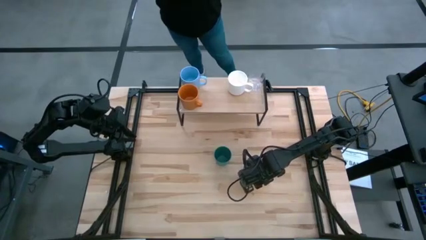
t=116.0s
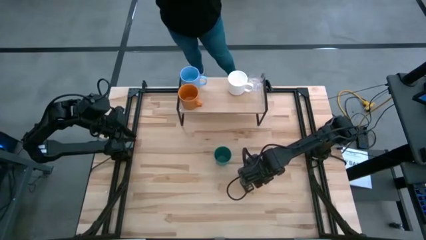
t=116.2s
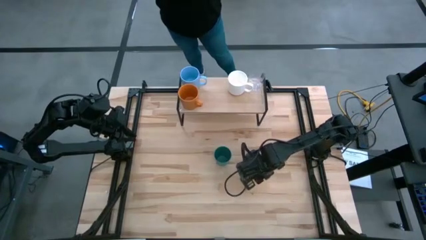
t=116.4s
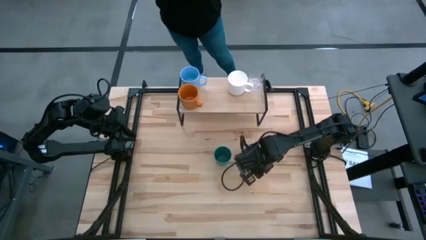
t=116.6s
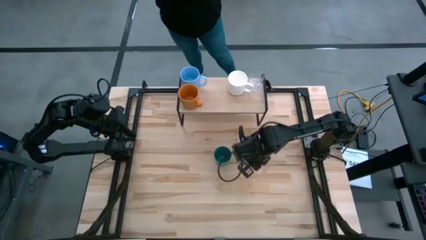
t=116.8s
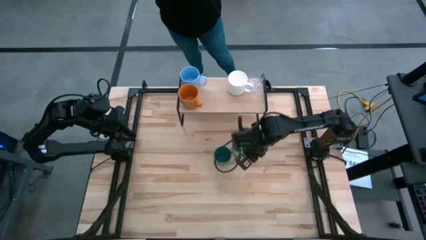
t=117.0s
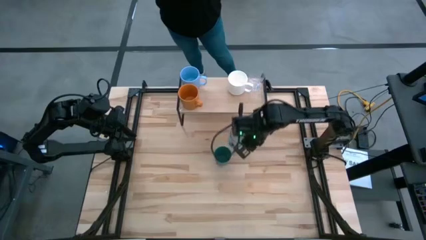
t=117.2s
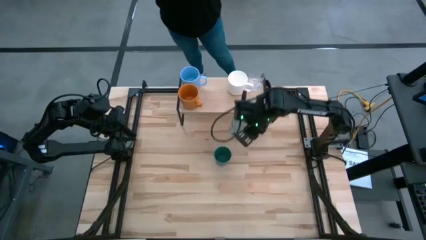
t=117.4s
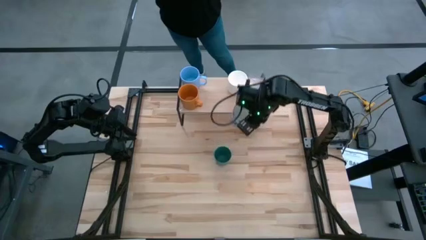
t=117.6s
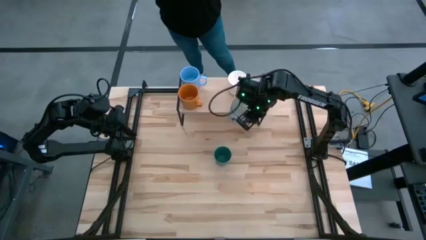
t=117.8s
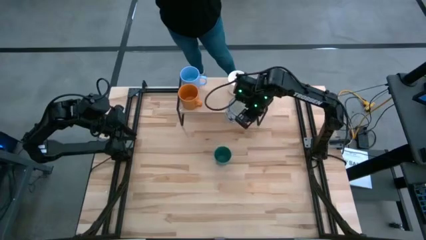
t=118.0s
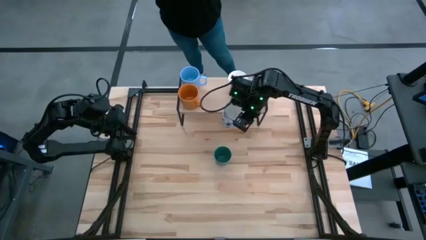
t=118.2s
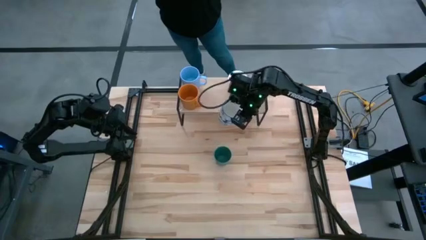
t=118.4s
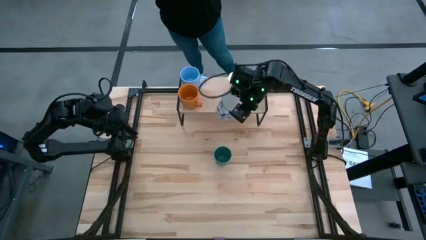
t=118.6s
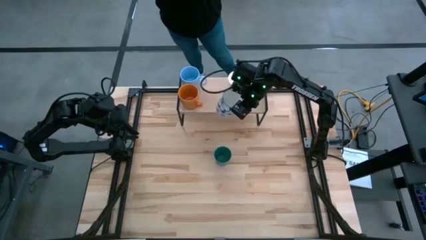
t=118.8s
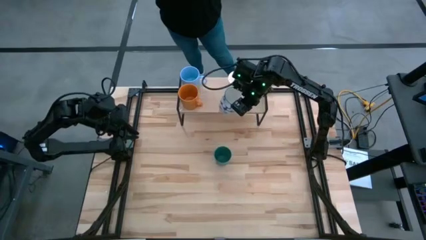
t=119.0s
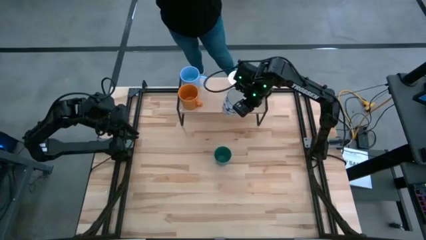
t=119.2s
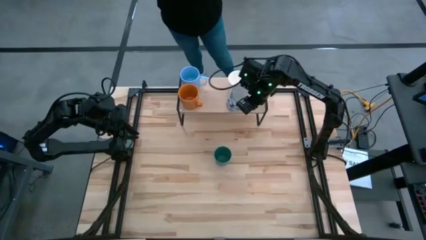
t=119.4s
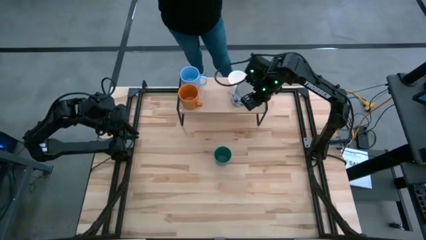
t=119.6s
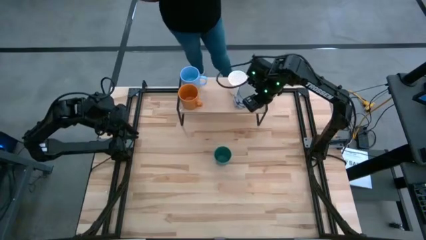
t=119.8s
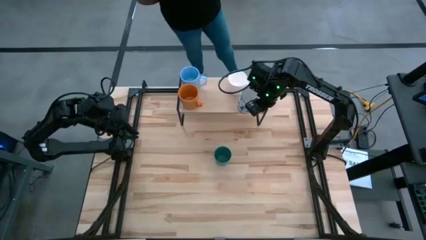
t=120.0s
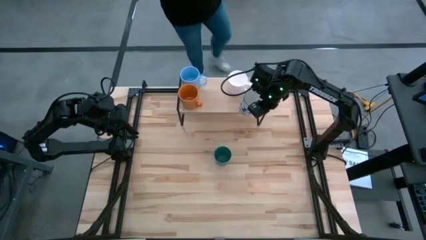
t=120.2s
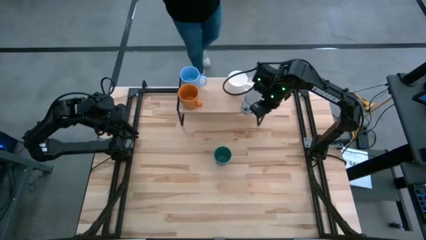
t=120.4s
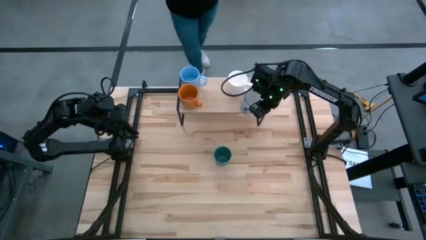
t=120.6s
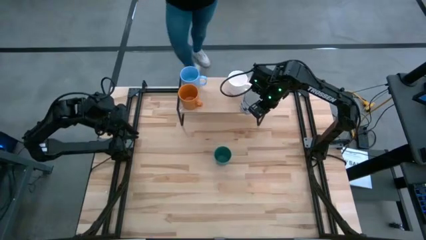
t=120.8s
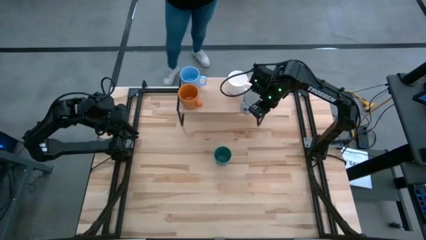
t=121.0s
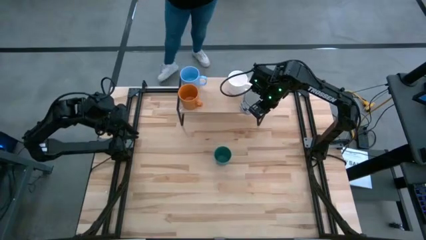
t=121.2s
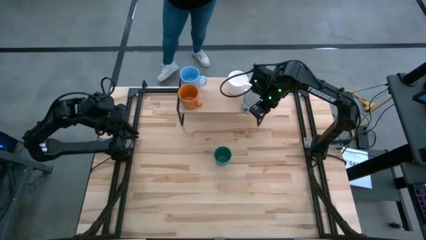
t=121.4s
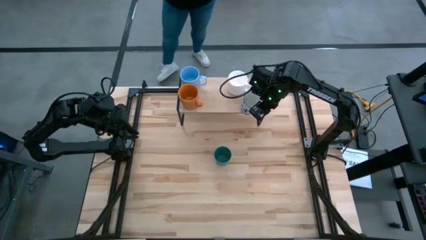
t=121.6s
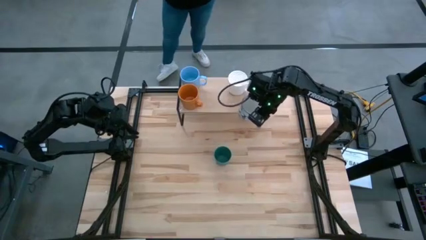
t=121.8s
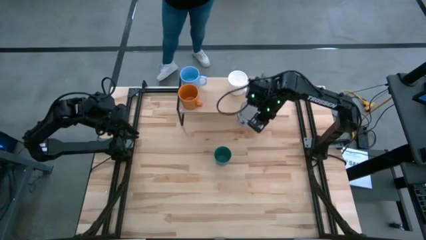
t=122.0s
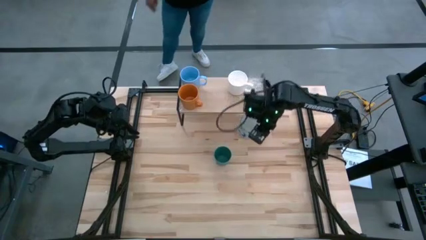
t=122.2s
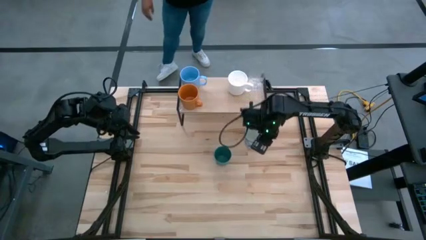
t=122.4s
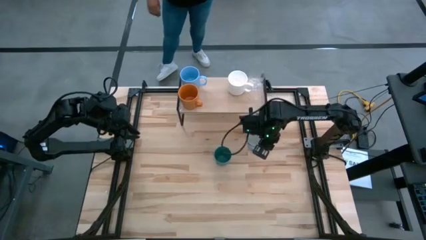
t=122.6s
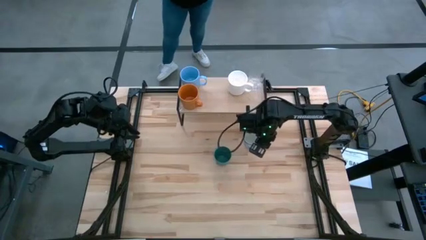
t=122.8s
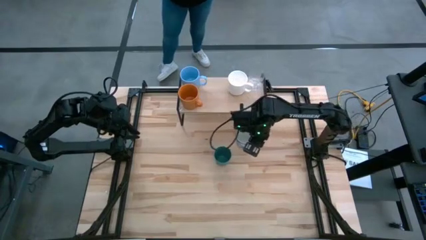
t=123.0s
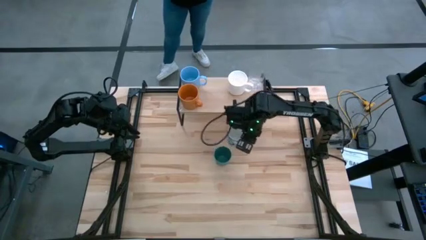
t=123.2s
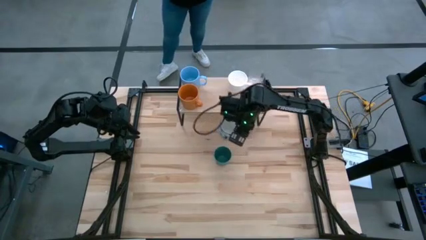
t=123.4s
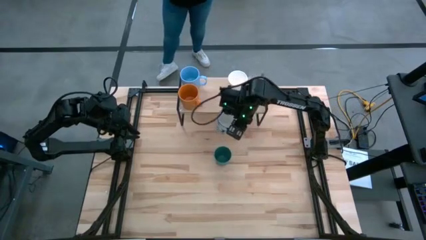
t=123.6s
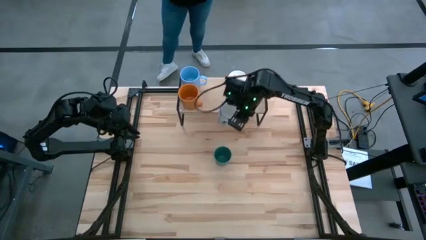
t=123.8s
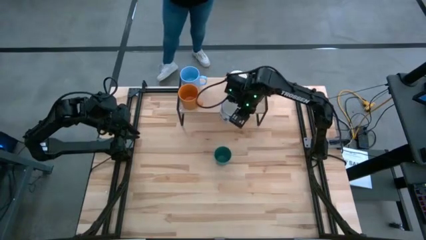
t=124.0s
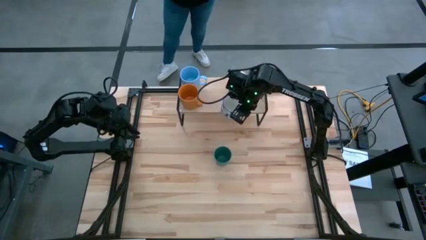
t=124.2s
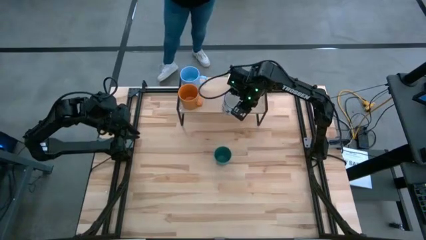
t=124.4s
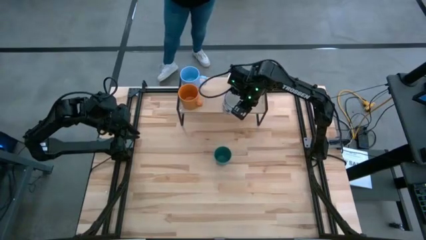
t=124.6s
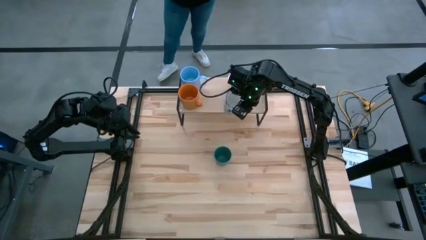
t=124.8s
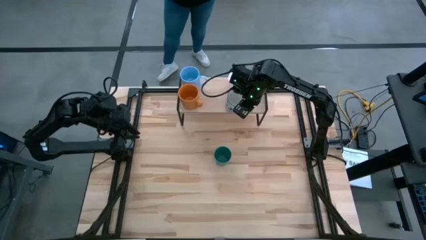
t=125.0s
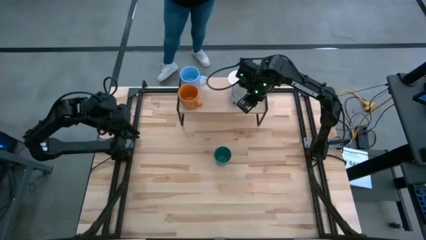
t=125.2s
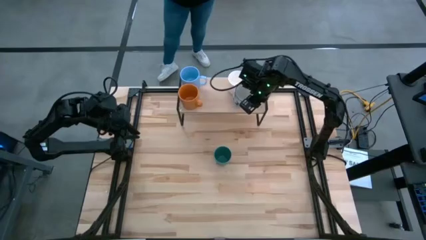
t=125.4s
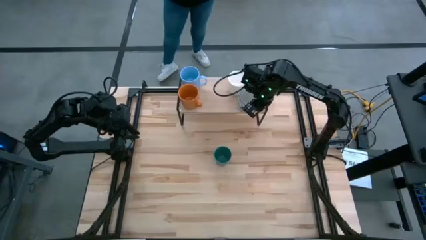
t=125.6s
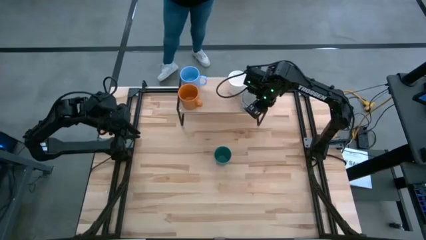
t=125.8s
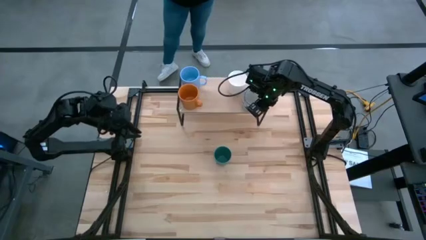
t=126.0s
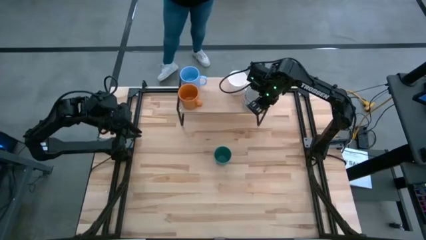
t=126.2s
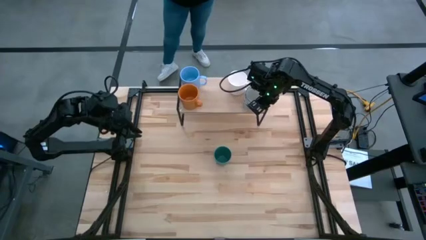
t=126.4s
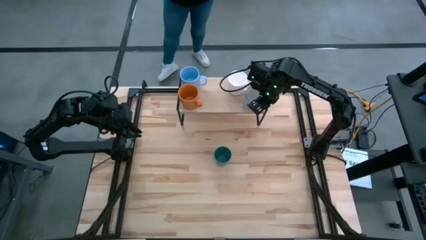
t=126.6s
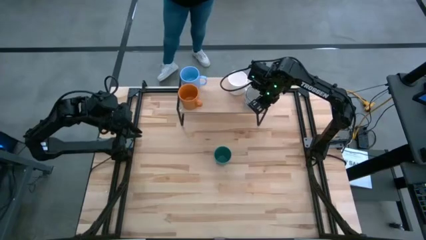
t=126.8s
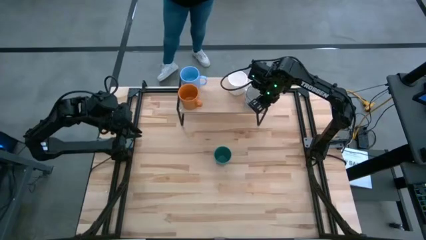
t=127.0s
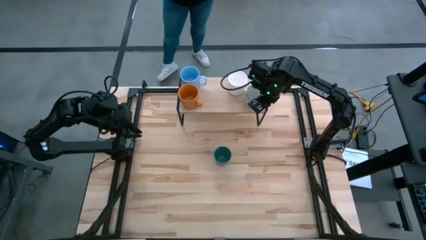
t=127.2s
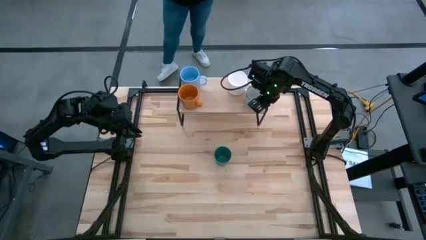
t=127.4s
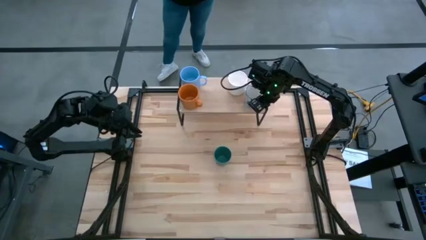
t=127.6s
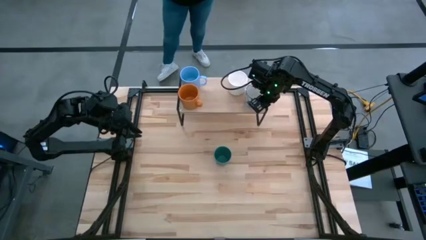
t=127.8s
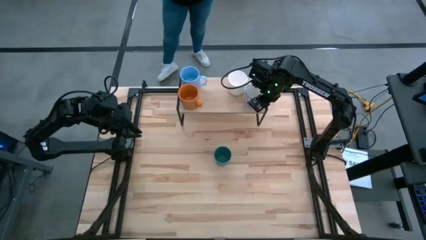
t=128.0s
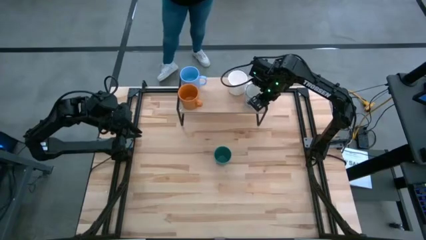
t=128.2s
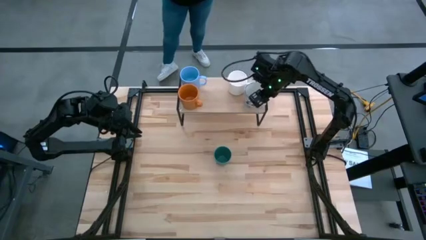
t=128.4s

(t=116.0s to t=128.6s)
Task: Stack small to large cups/mugs on shelf
Put the blue patterned mug on the shelf

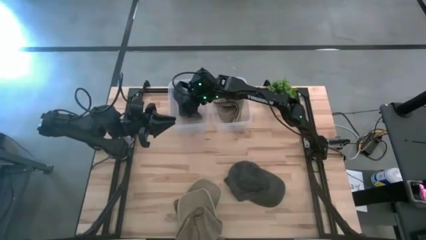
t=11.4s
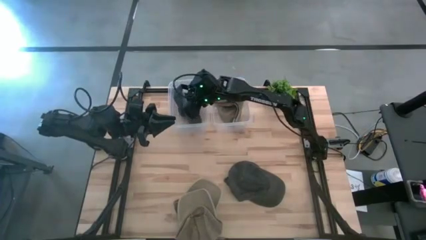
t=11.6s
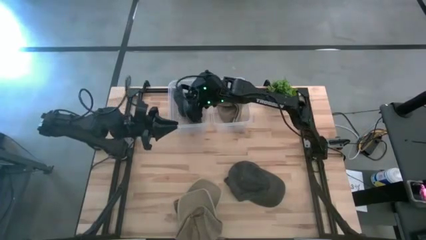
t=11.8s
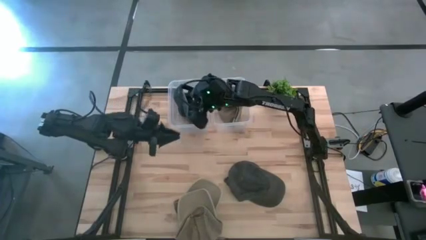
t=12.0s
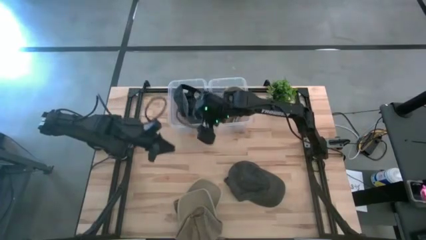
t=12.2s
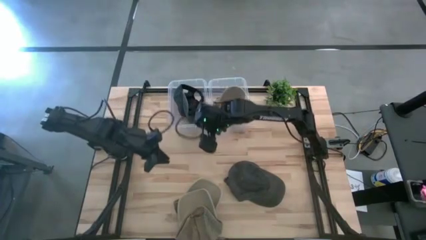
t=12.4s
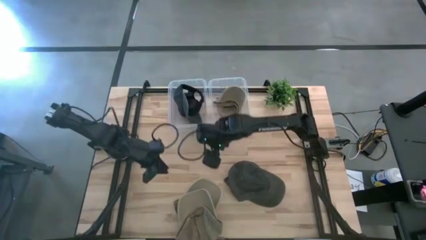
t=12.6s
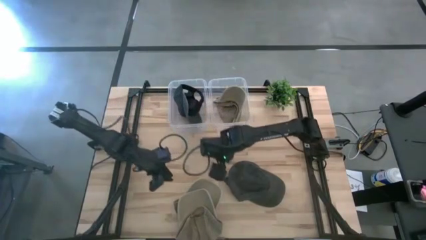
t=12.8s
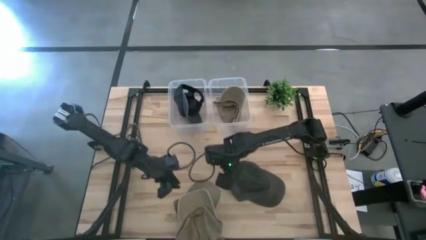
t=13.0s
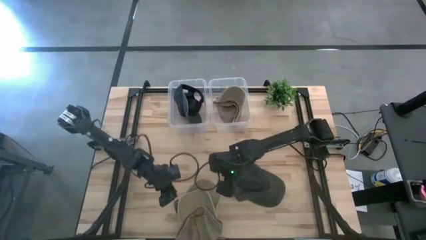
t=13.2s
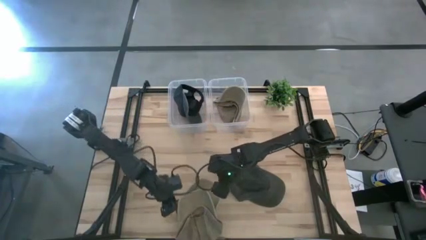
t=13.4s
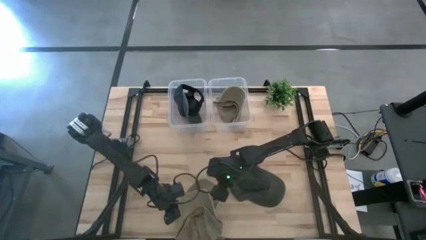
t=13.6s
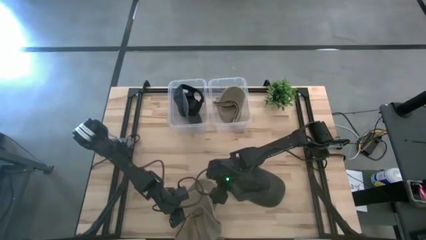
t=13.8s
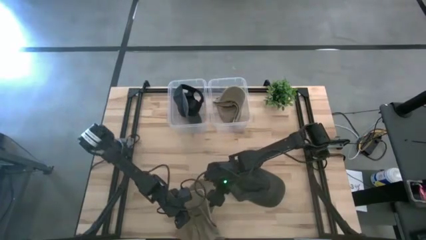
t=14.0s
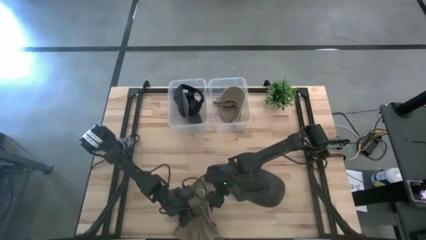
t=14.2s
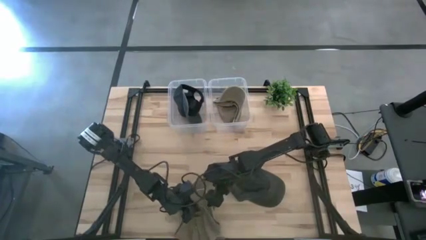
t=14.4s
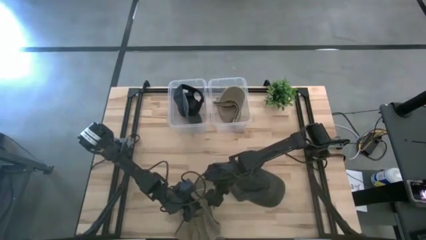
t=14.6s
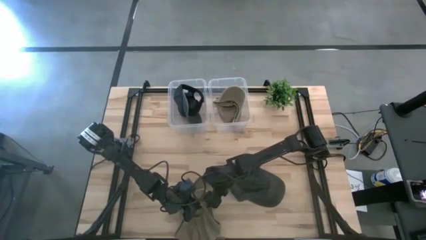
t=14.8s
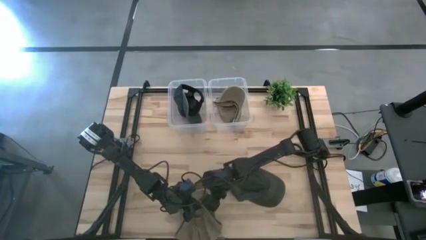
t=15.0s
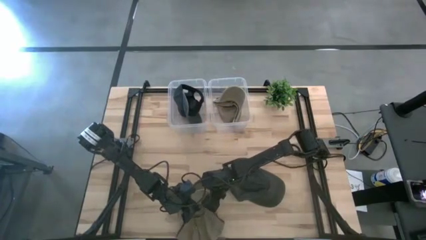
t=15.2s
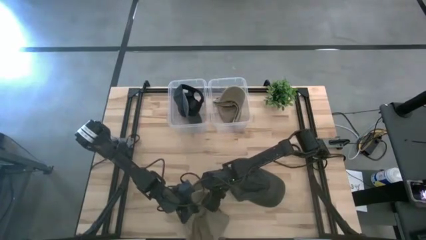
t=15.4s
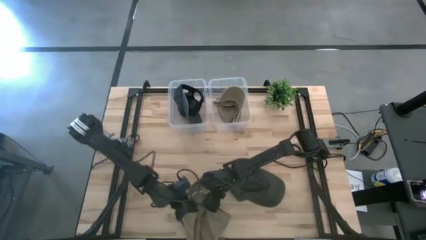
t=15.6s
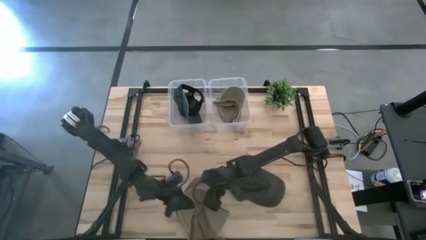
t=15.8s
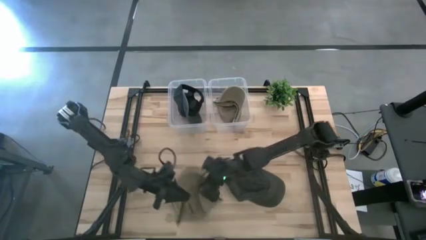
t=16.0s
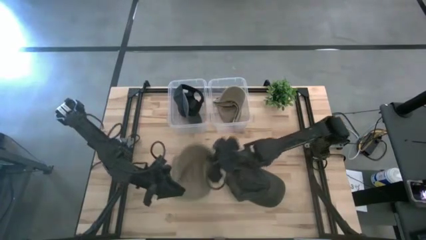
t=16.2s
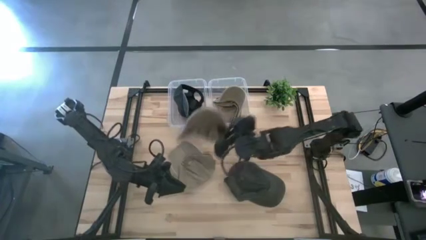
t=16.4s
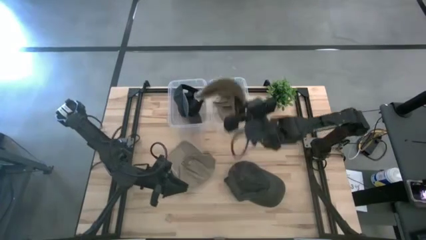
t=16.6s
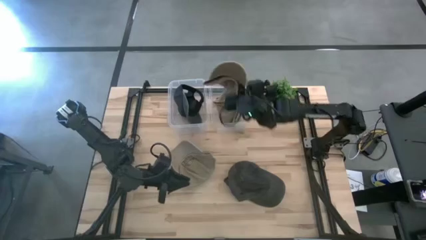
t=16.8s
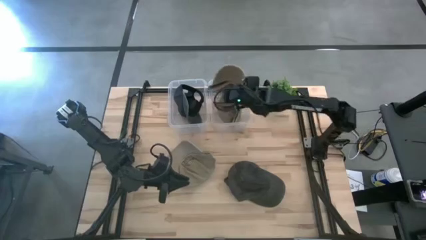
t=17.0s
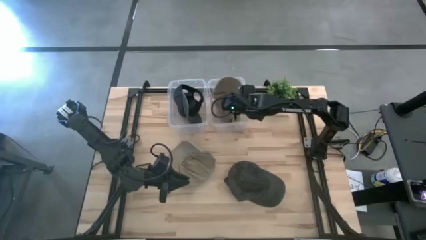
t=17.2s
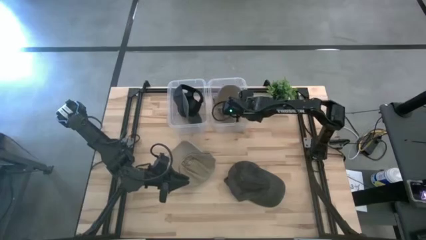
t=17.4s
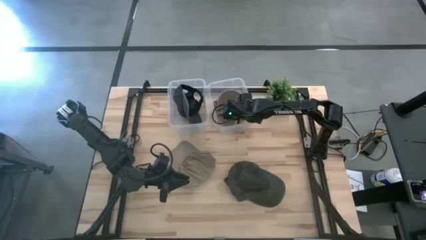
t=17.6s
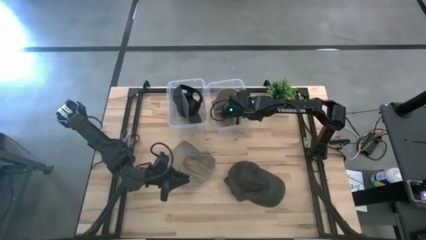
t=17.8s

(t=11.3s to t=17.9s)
Task: Pick & Place hat
Put the bottom brown cap into the right transparent bin
